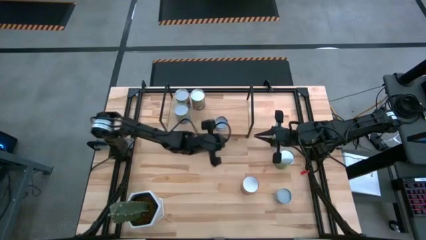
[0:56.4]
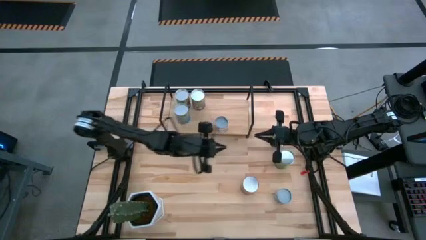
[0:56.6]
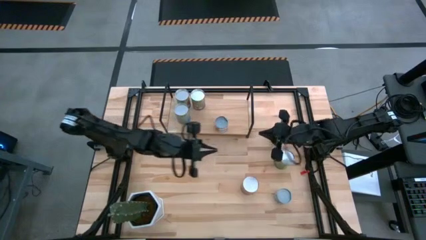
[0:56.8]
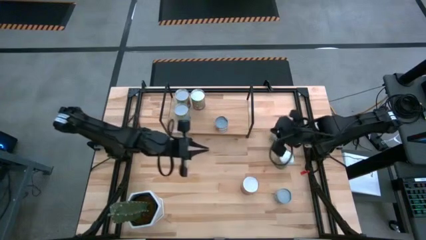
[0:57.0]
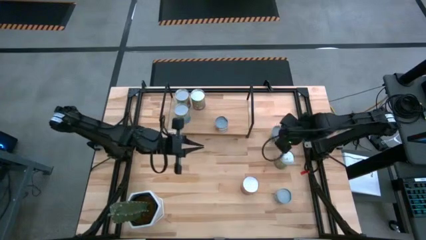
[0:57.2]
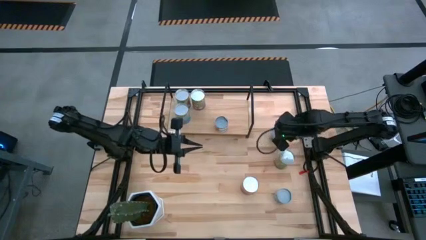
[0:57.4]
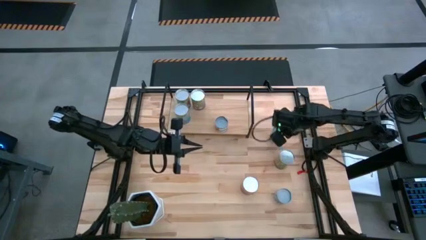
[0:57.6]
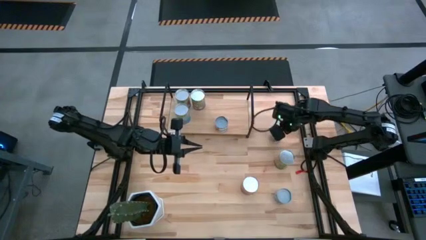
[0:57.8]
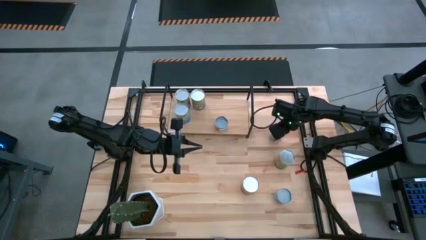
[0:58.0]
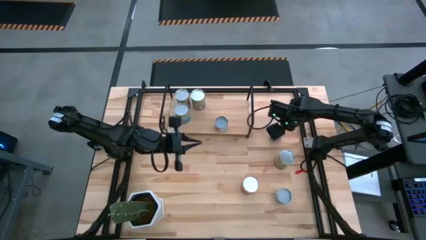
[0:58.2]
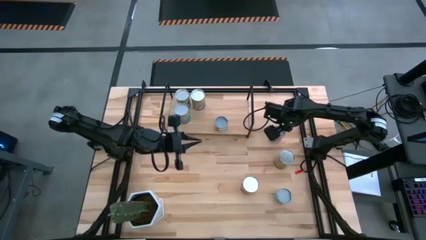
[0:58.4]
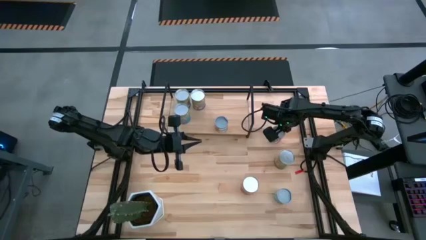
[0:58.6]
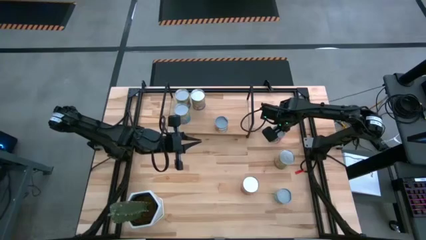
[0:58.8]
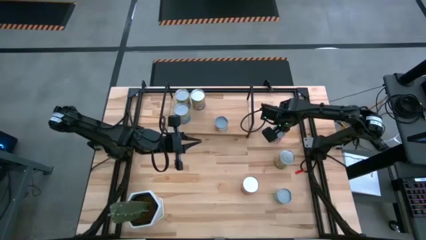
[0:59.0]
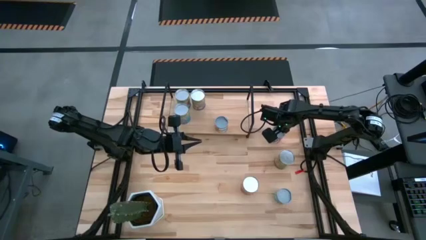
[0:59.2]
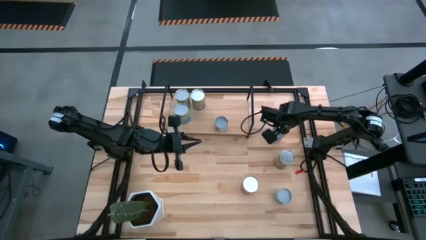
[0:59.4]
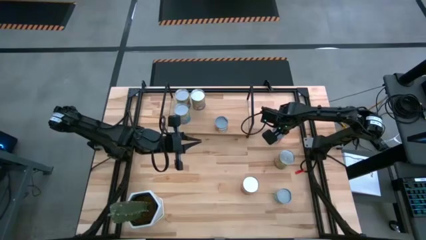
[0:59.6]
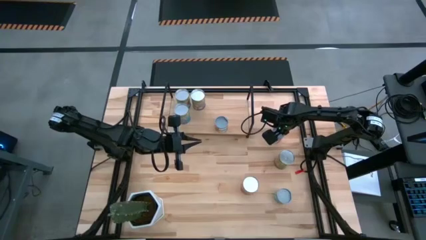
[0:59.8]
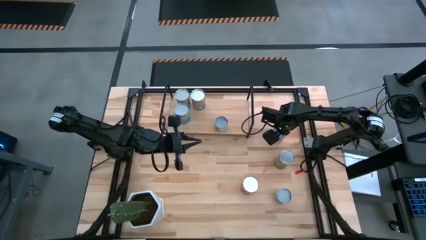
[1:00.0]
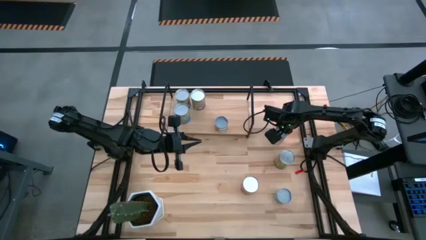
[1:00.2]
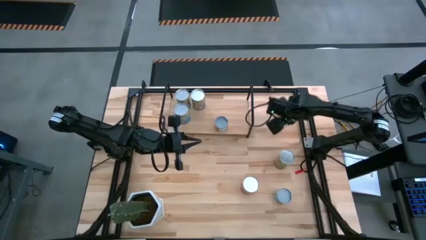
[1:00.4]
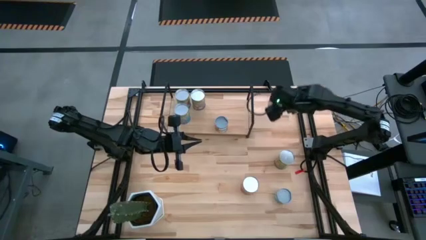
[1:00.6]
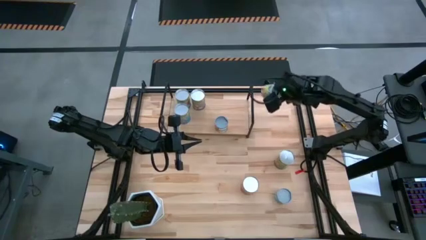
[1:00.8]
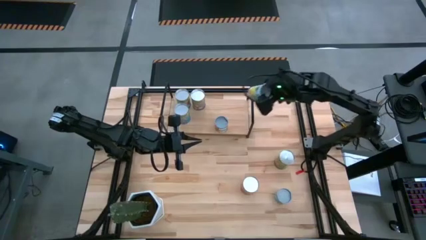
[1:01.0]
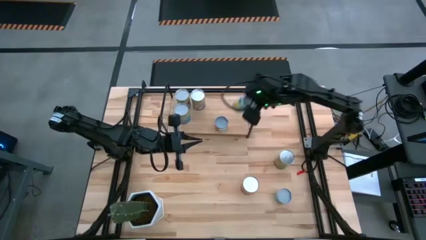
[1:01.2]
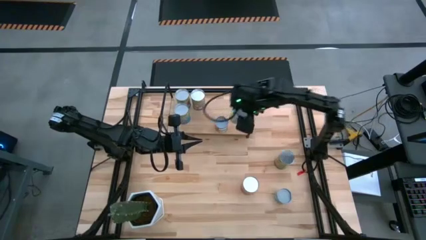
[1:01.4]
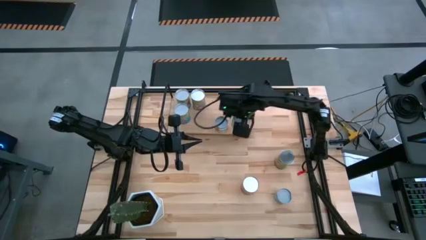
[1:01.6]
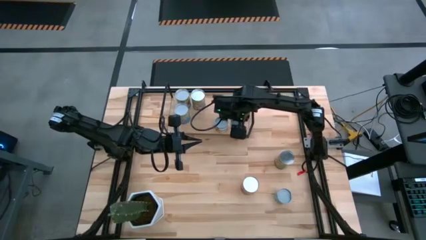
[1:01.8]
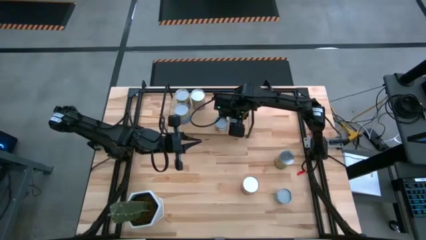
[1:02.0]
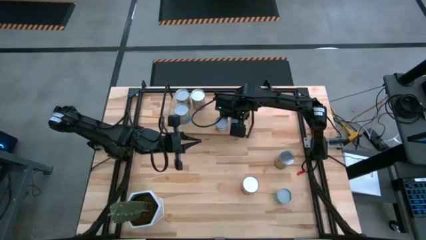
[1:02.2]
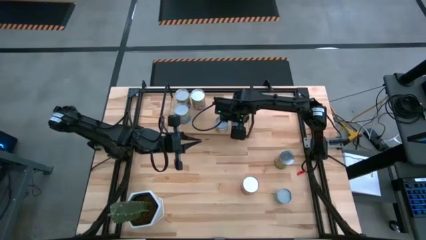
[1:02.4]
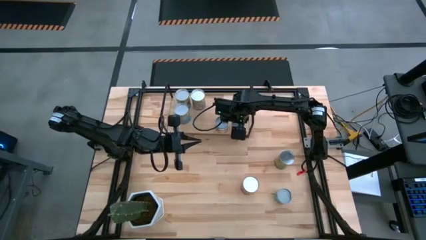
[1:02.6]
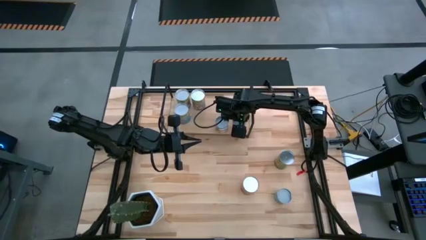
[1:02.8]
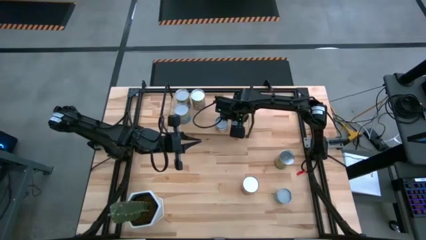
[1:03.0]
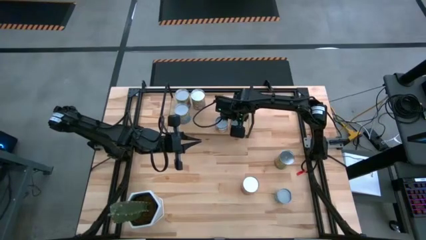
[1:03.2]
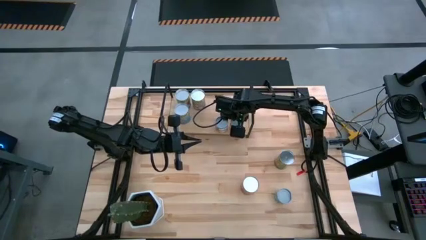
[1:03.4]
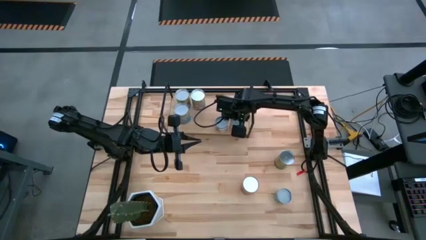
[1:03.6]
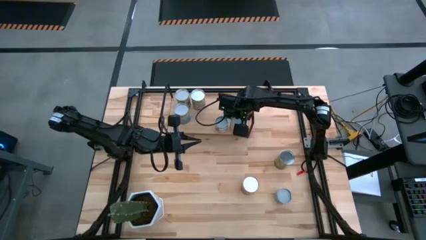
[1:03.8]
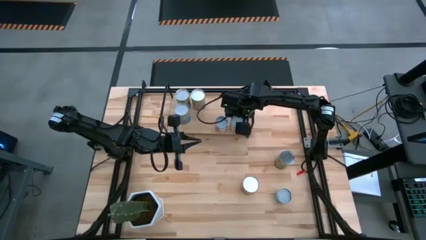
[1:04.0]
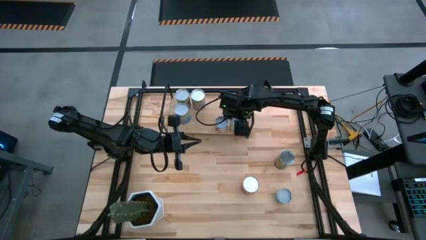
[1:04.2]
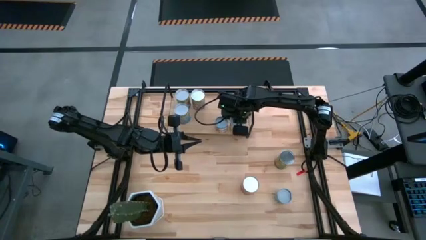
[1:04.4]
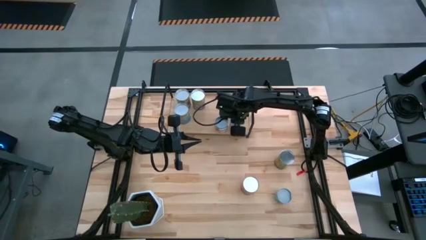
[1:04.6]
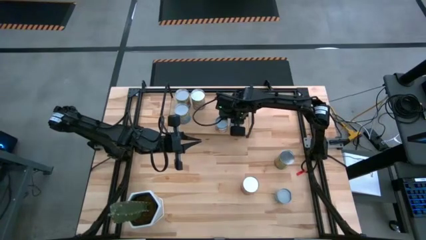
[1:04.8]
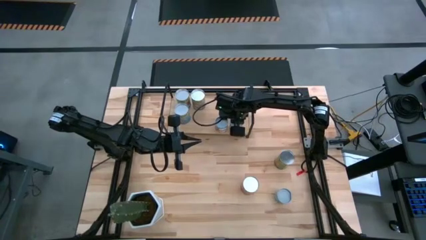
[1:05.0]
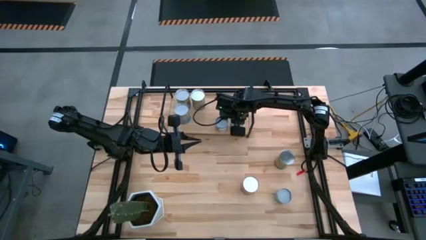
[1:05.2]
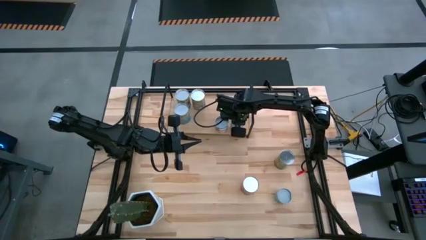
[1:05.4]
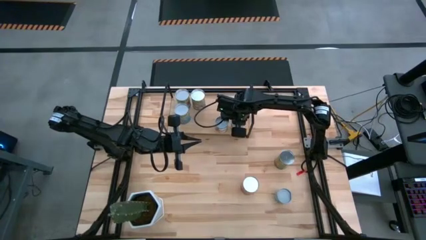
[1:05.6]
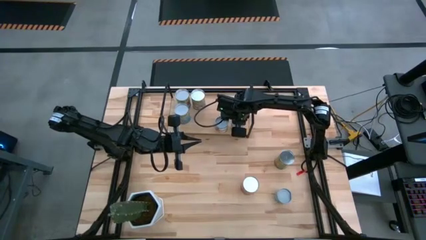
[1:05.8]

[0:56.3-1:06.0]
Task: Pick and place cans onto a shelf
Put the canned mixed fruits on the shelf

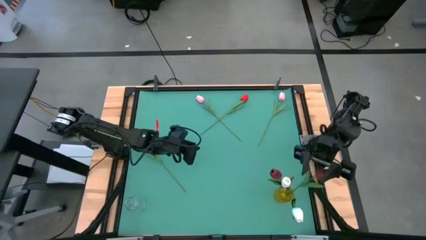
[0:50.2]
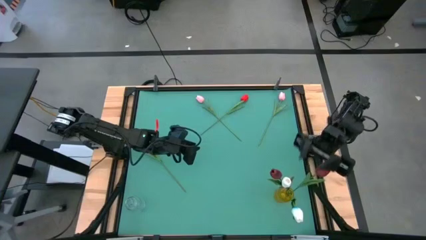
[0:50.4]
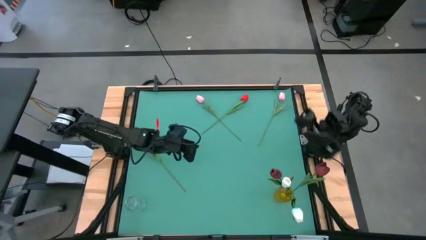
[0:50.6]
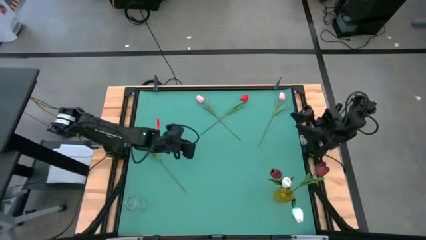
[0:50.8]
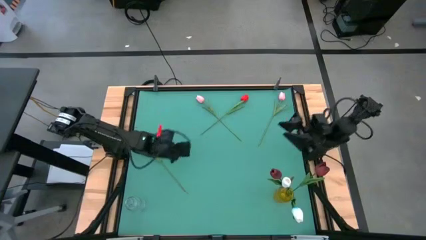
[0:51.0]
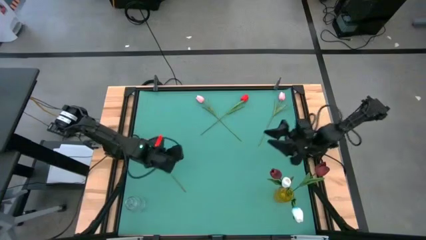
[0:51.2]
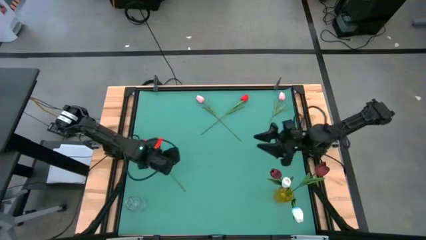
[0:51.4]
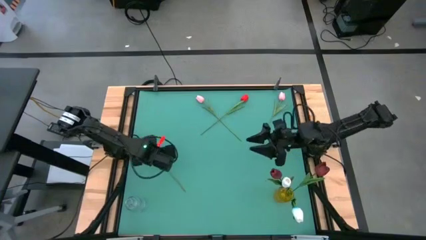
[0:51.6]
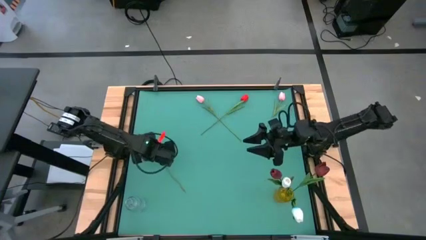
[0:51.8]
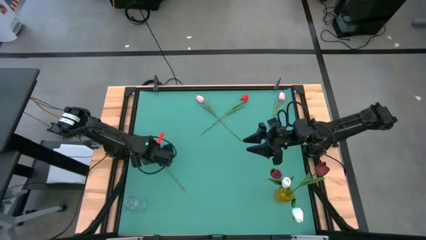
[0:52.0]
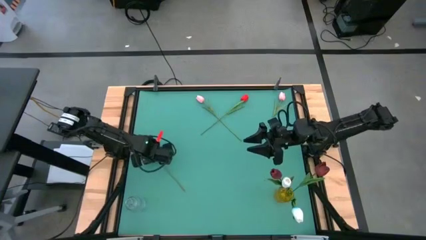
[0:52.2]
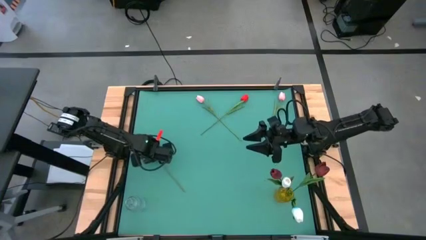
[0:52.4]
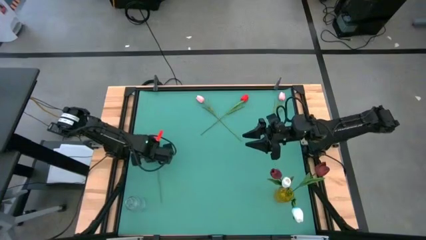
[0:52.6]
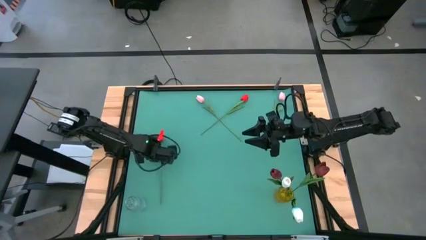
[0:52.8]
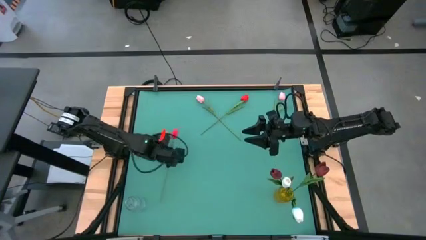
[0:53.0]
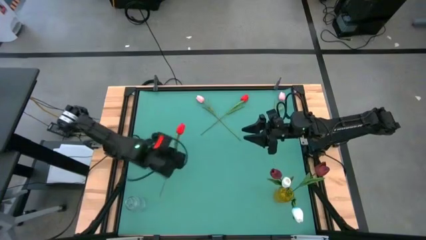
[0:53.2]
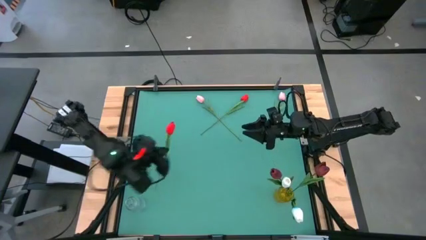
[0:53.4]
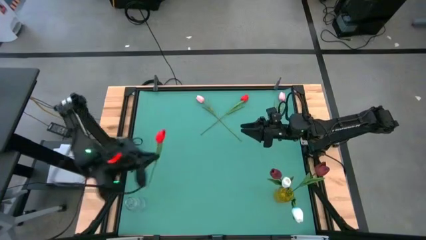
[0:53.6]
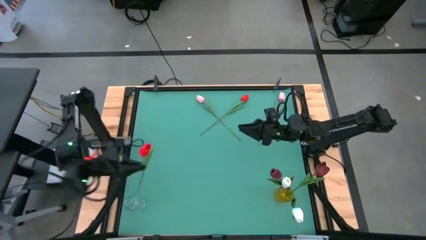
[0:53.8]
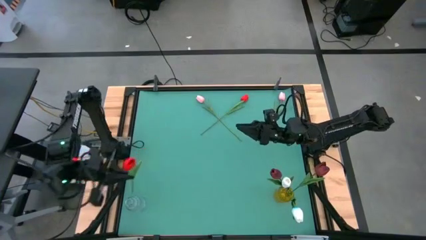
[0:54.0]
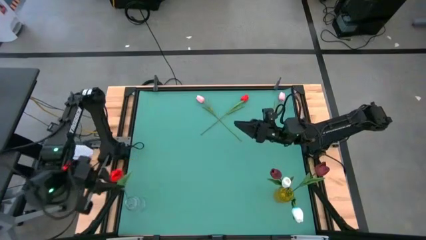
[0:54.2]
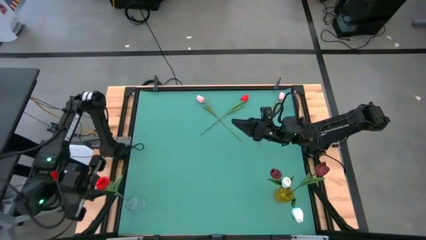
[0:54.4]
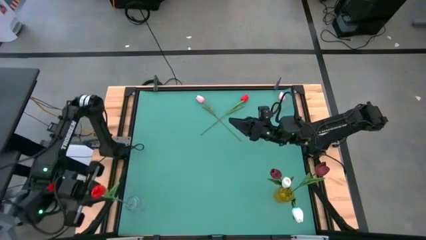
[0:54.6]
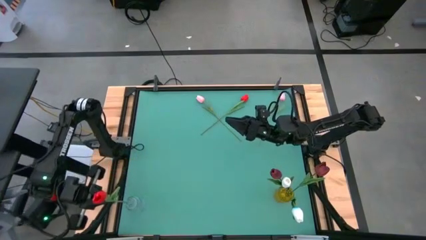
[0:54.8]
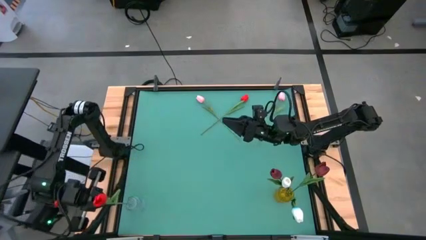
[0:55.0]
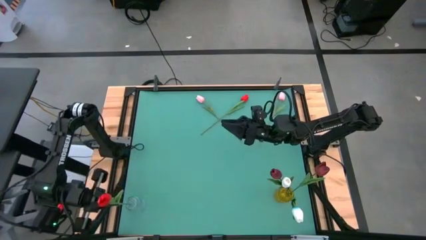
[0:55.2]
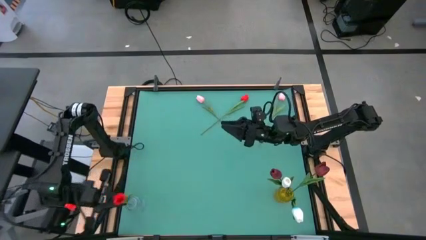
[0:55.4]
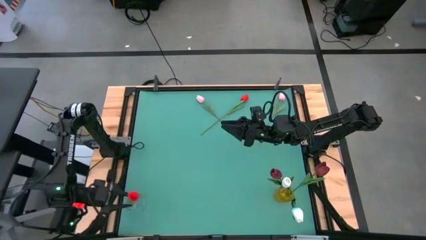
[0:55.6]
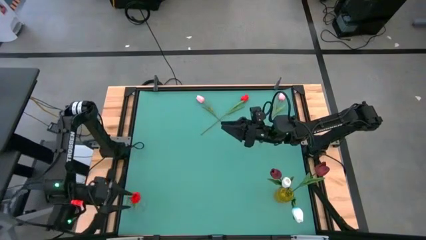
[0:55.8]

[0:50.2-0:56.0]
Task: Sort flowers into vase by color
Put the bottom red tulip into the transparent flower vase
